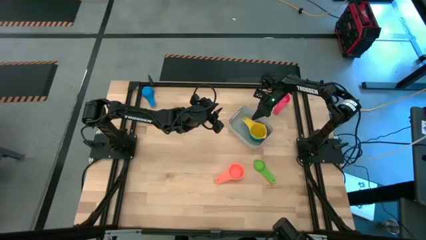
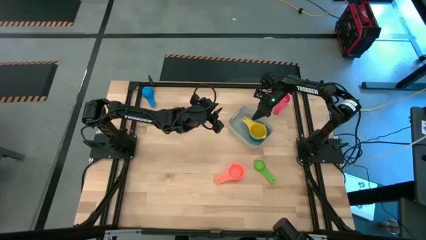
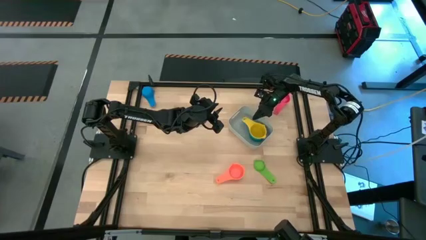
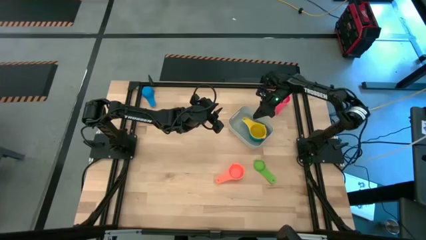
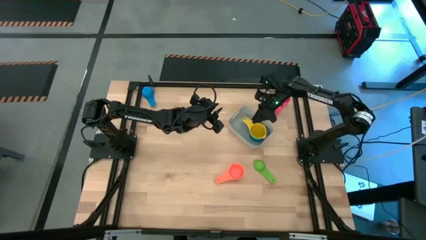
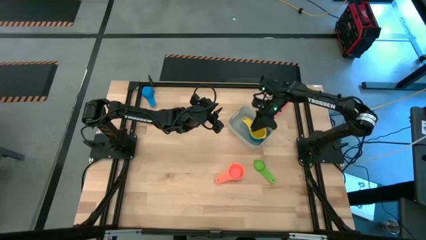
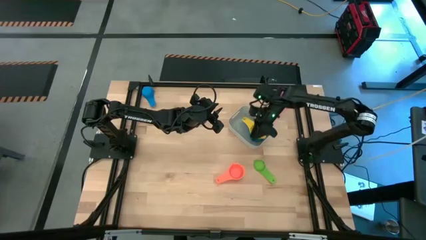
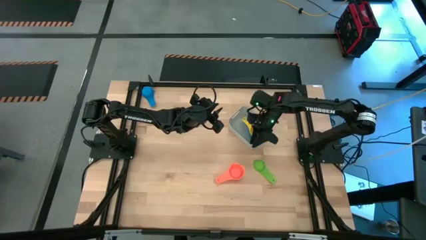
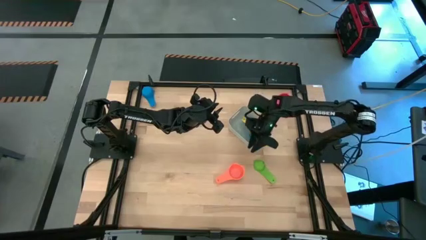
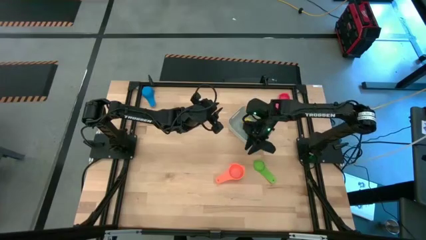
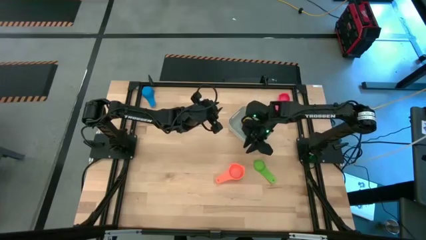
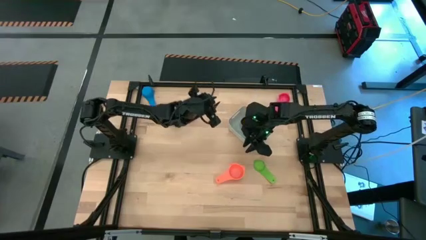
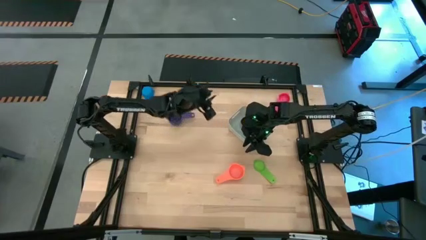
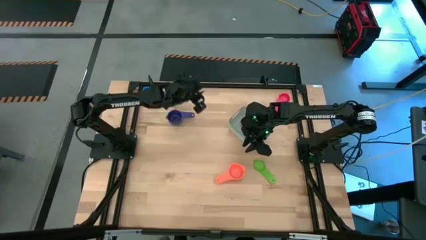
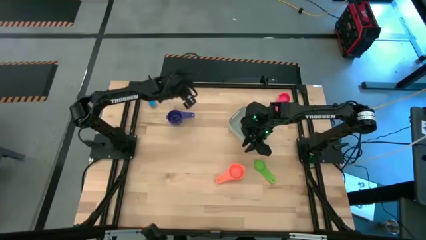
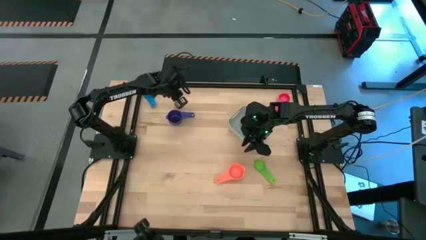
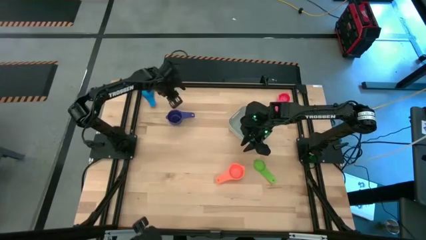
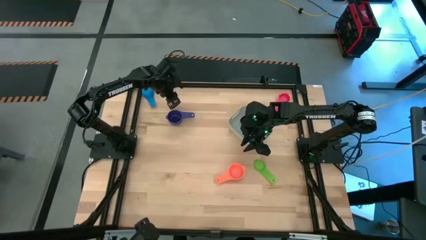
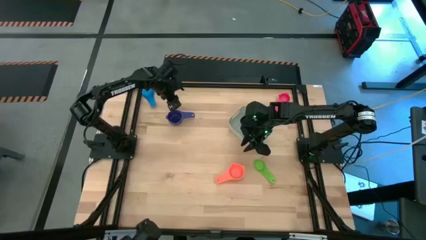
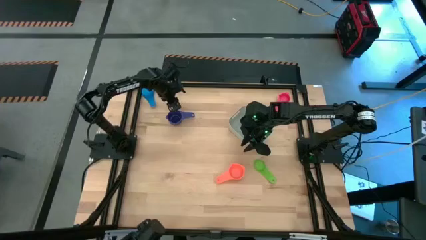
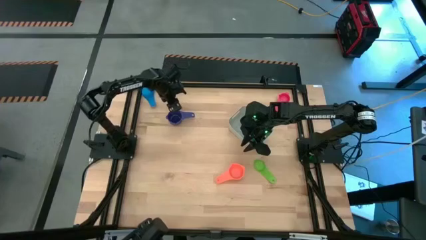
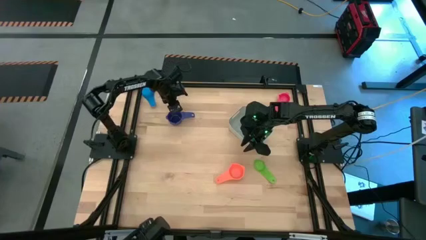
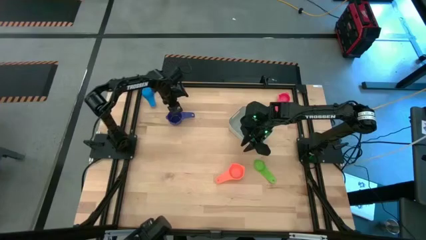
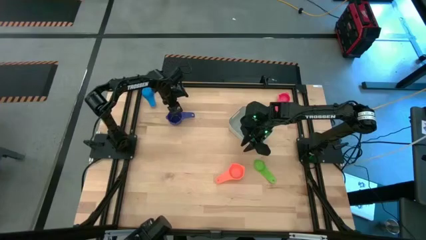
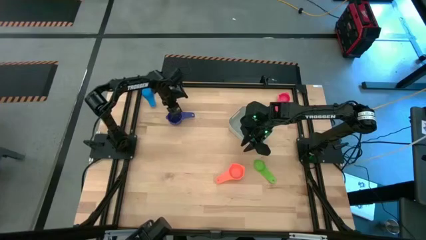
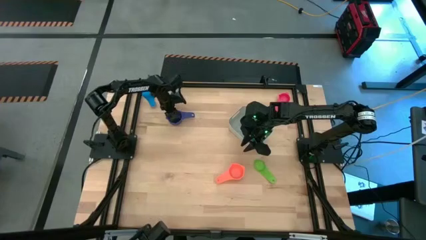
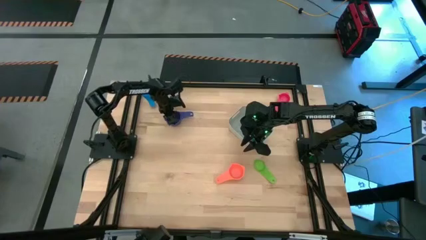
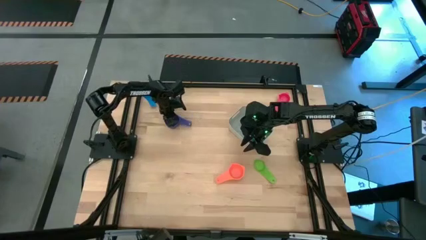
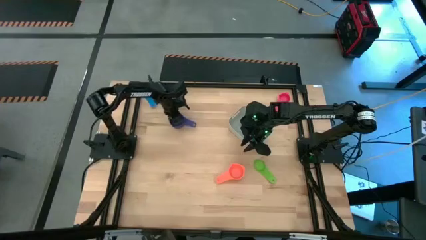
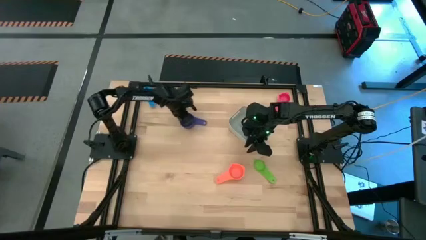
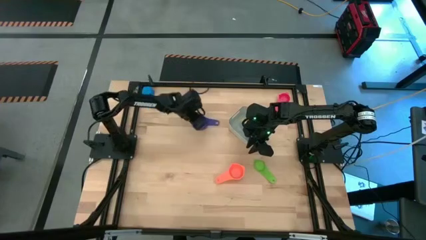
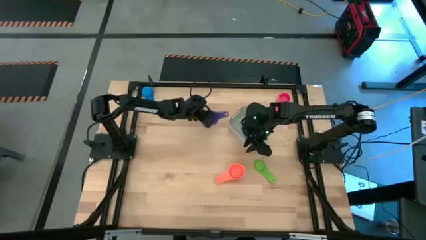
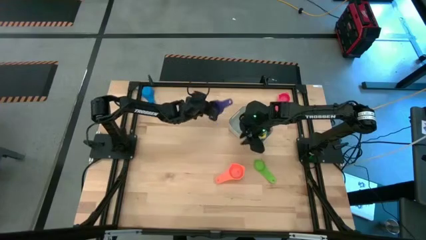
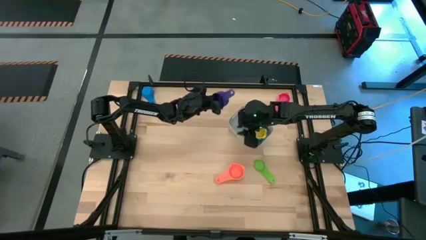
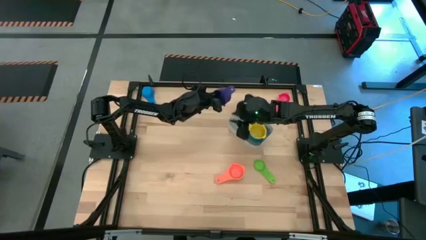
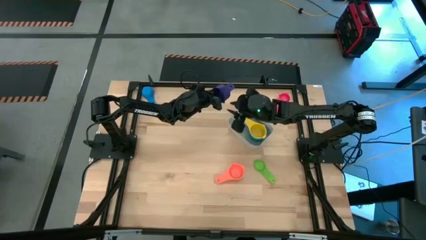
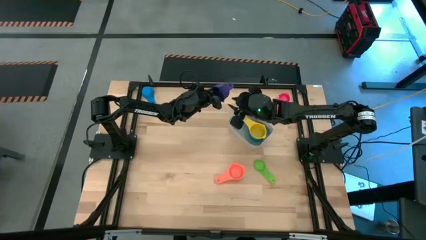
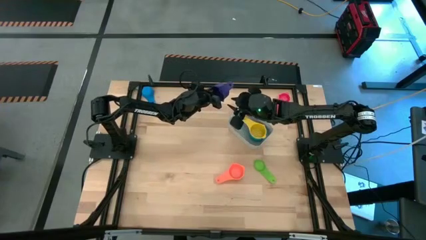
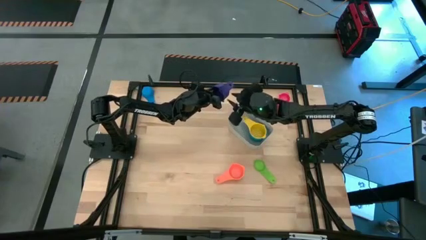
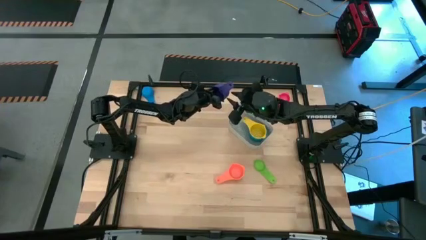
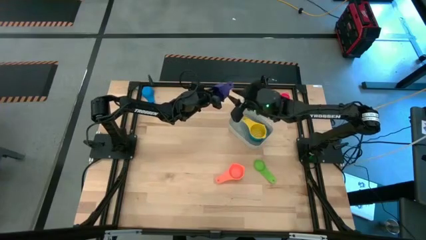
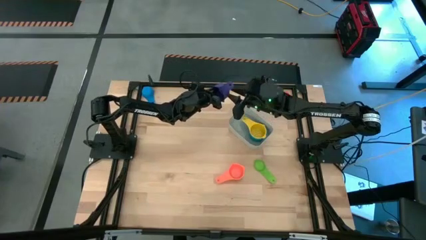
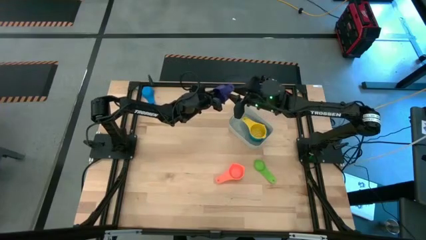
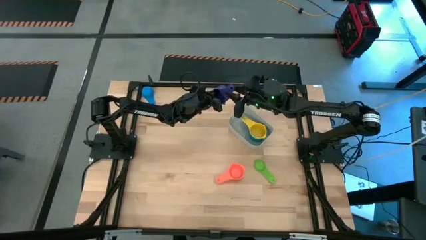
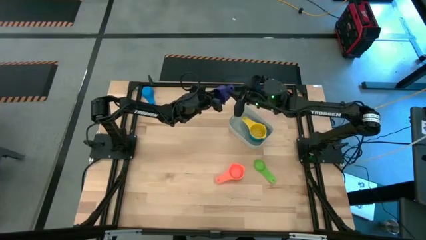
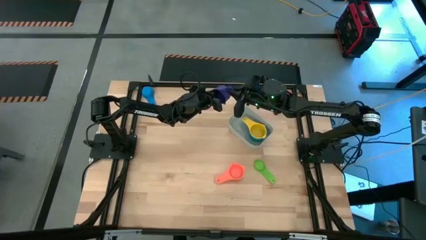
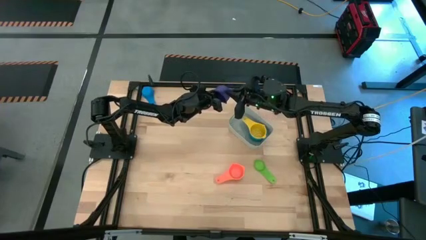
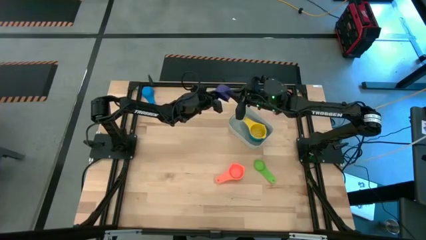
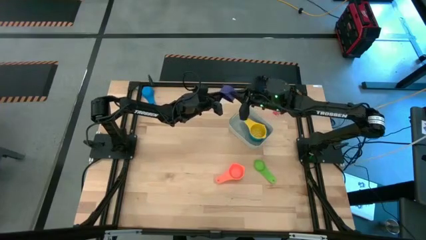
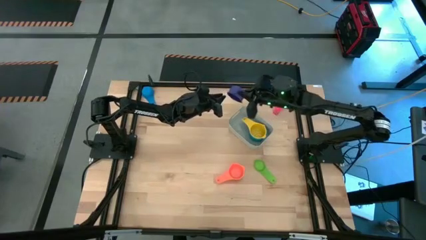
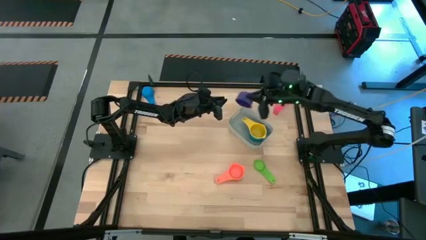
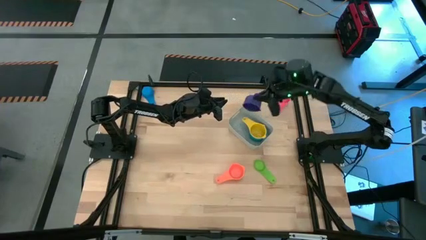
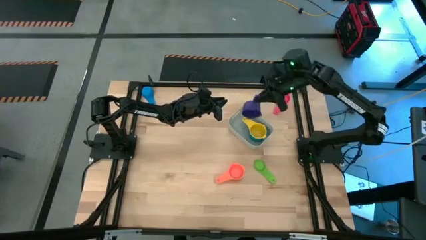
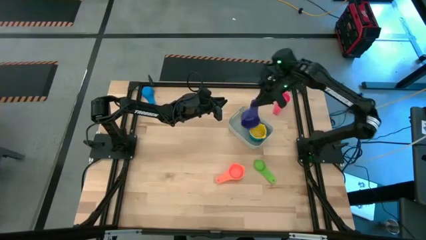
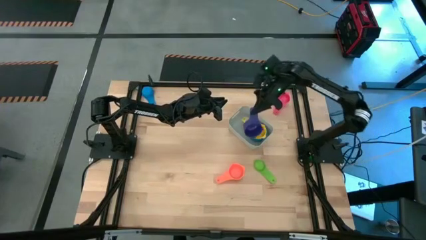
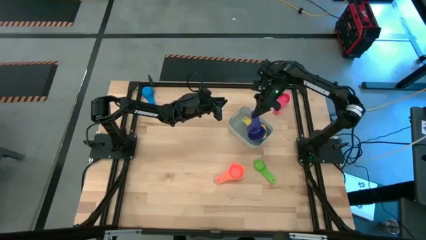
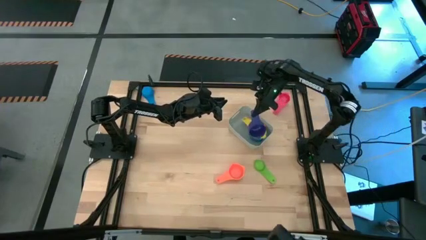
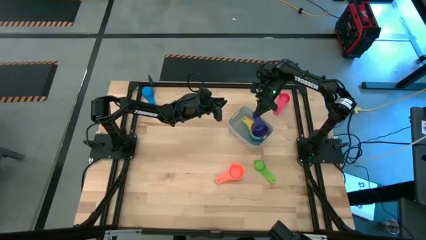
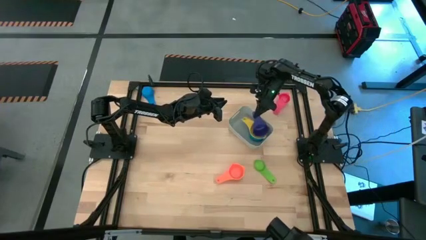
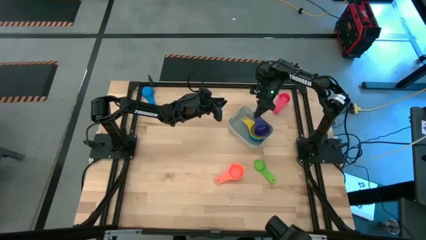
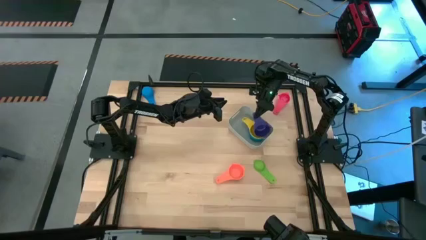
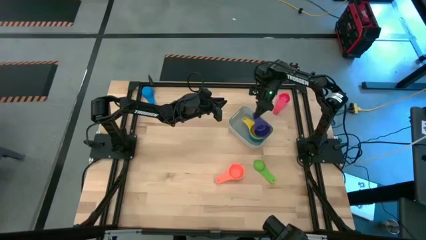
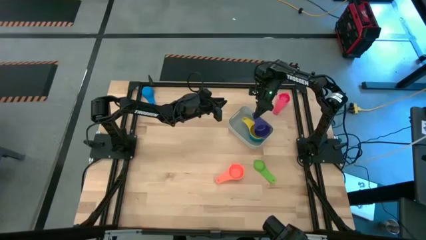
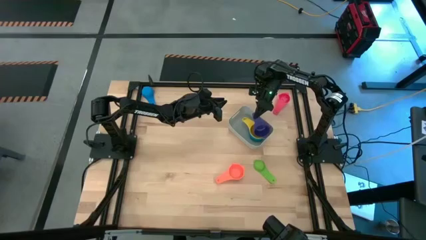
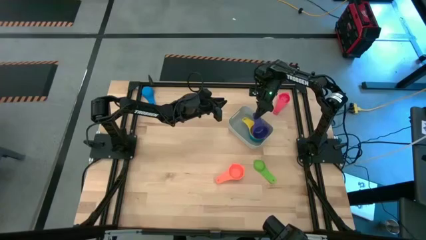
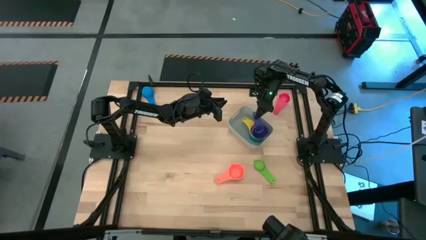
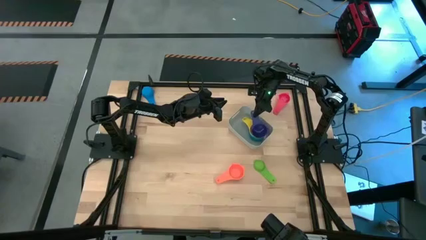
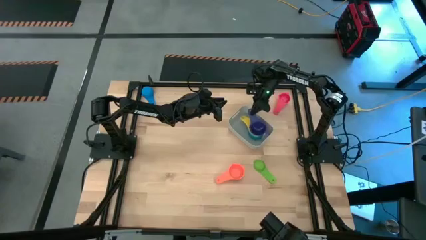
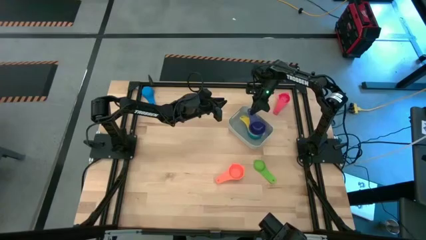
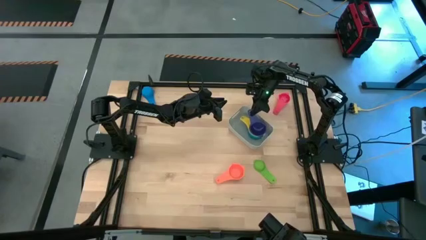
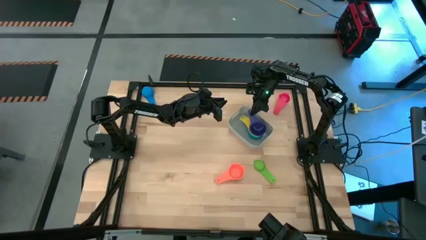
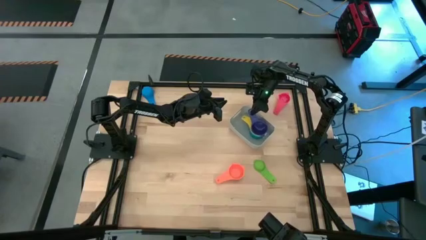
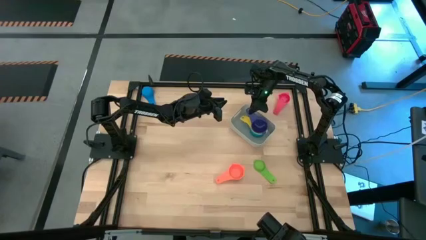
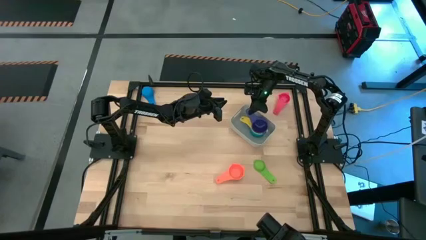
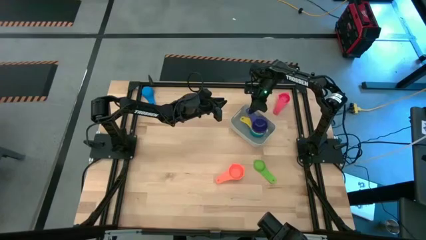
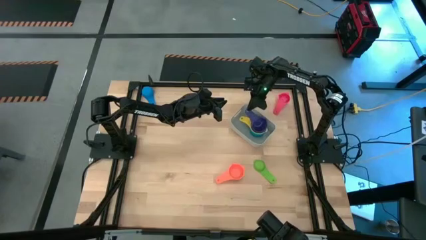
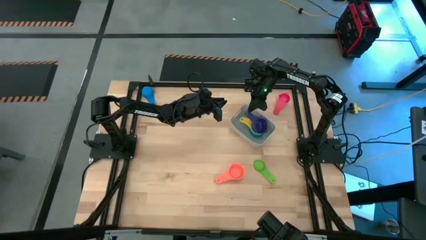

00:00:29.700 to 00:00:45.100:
Task: Nest measuring cups in basket
Stack the dark blue measuring cup on top of the yellow measuring cup in the bin

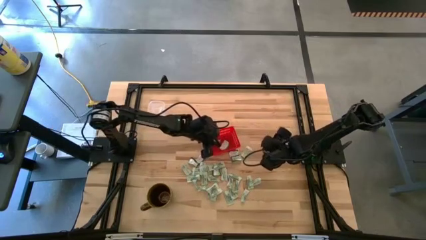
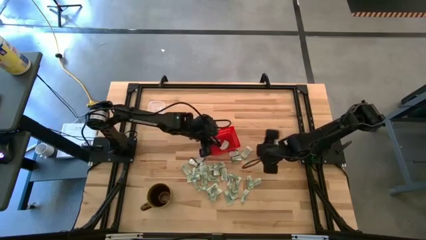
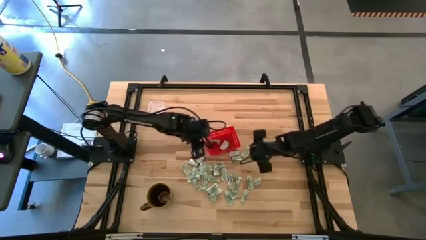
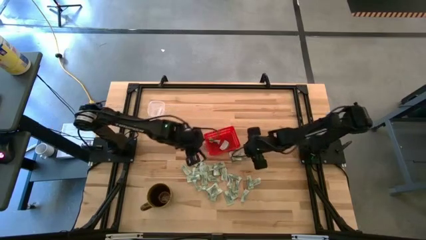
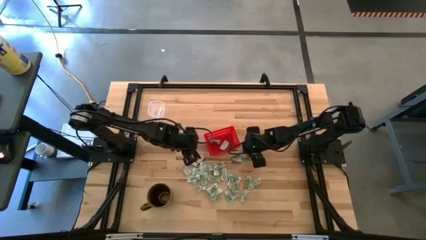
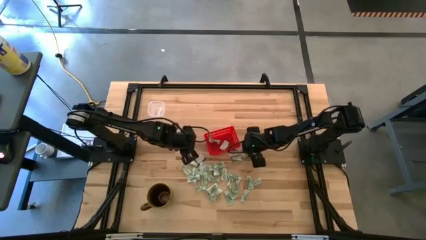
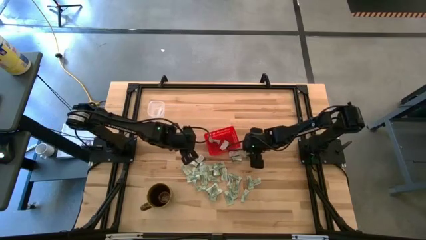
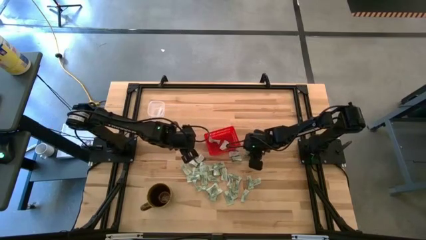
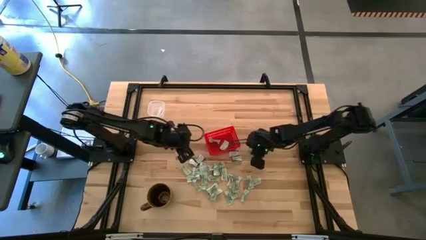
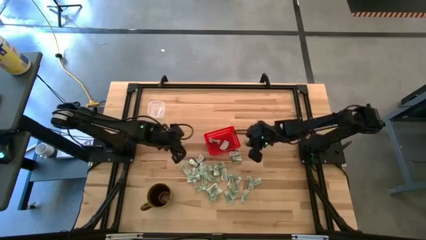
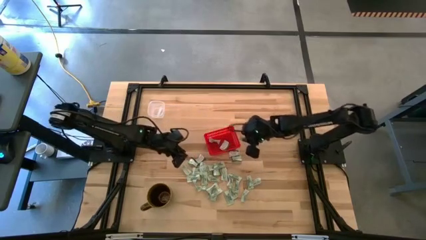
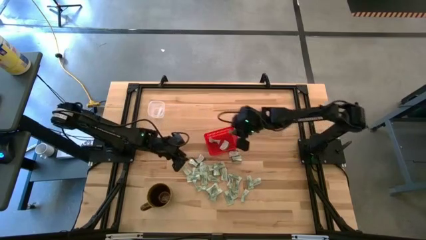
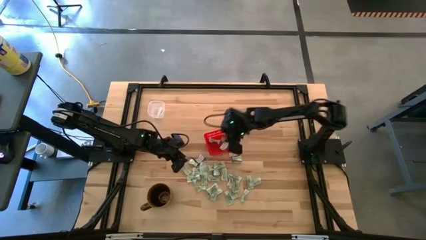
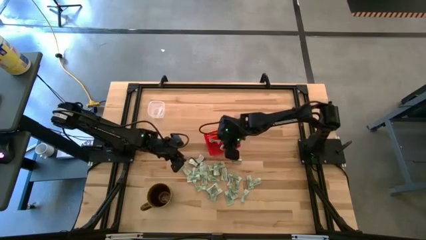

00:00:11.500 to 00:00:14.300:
Task: Pick and place items into bin
Put the green stevia packet into the red bin
